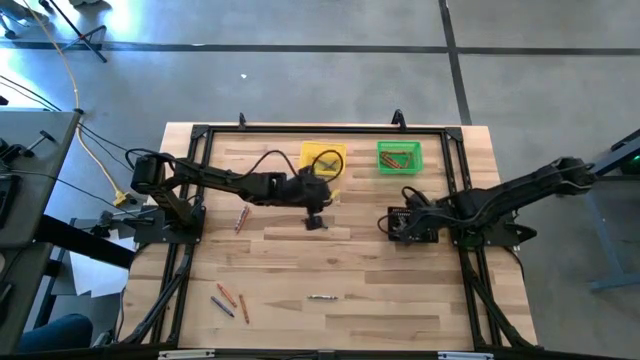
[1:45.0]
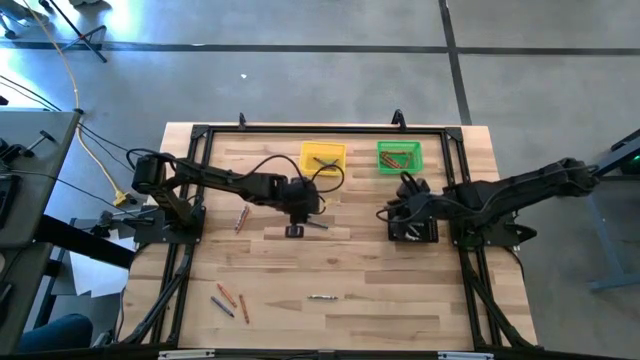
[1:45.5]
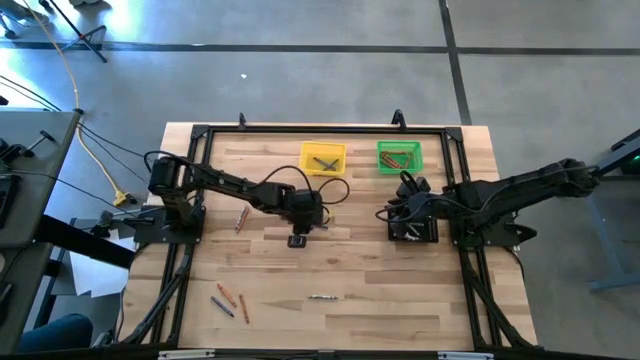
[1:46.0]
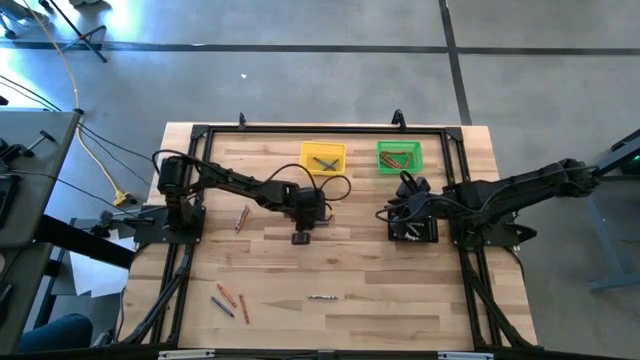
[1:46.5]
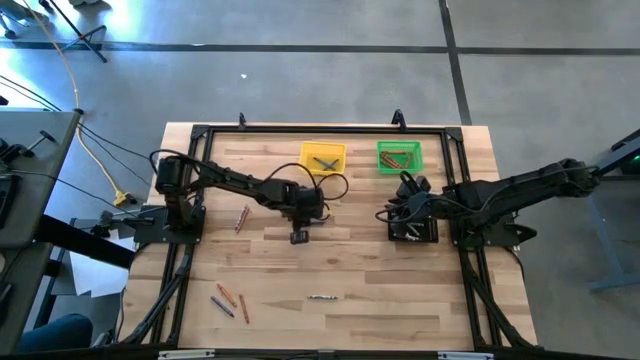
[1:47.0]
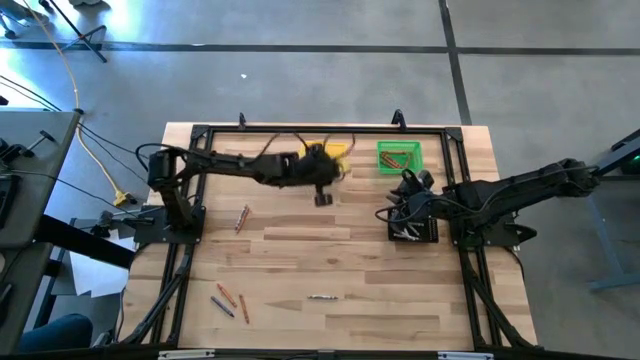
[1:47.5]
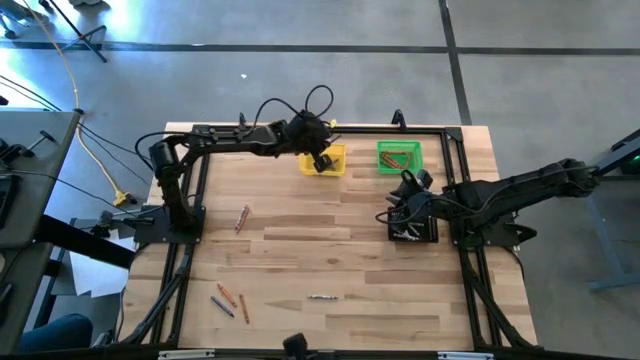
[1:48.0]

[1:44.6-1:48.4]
Task: Sort crayons
Put the blue crayon into the yellow bin

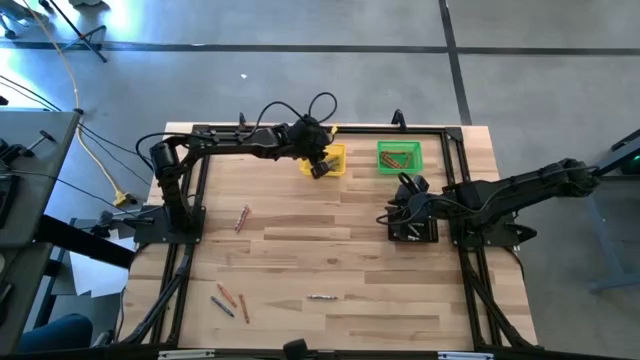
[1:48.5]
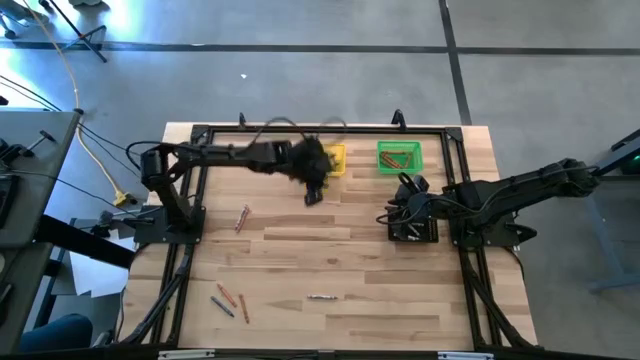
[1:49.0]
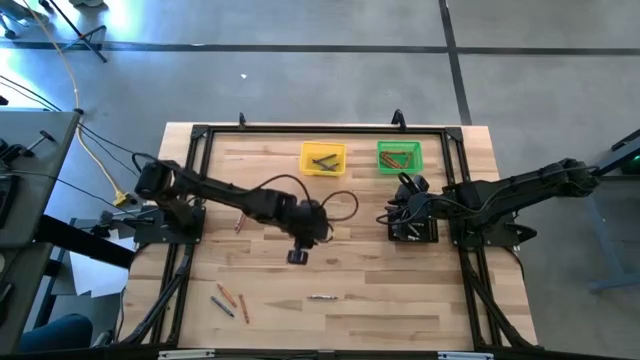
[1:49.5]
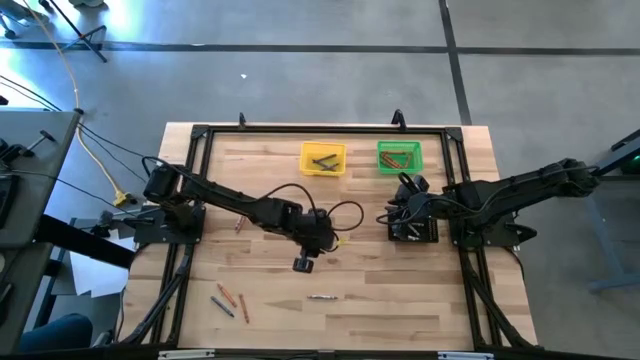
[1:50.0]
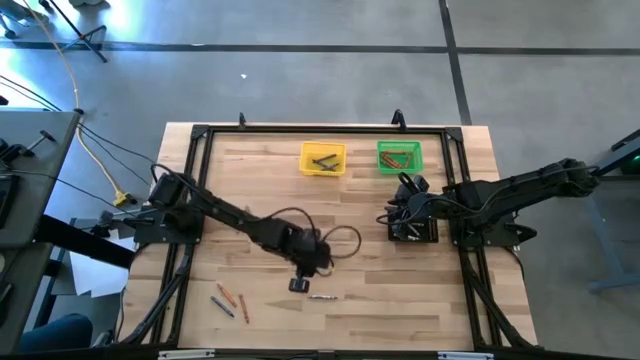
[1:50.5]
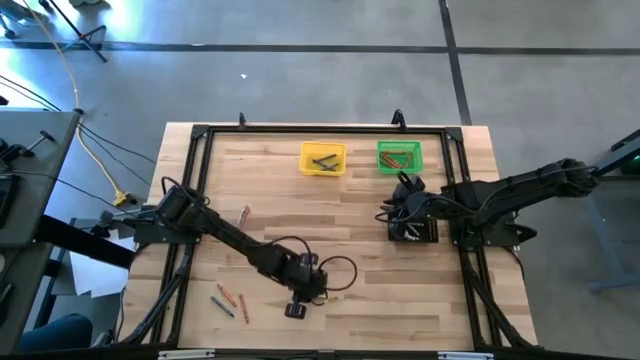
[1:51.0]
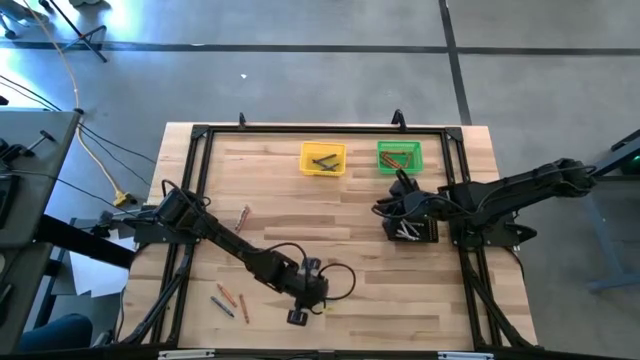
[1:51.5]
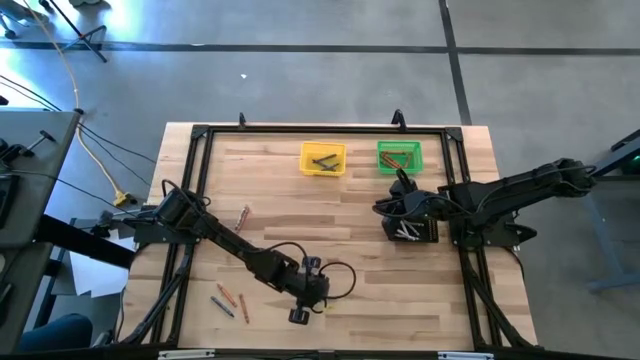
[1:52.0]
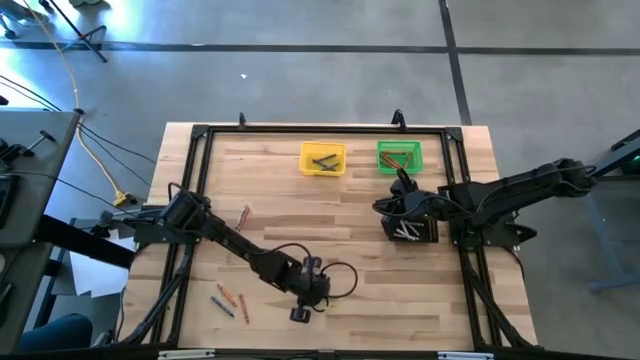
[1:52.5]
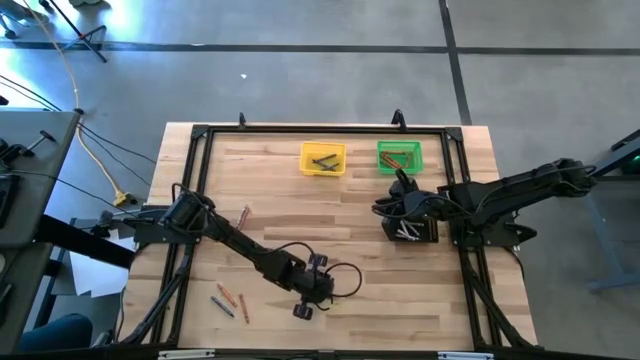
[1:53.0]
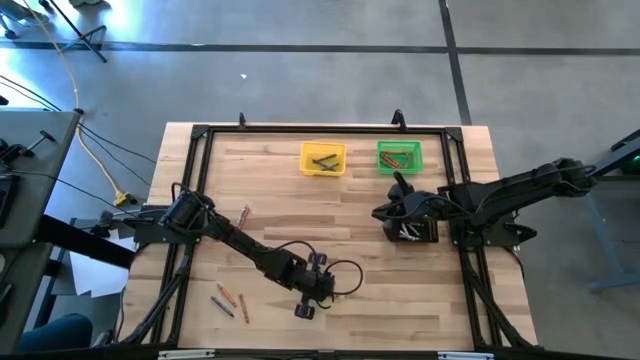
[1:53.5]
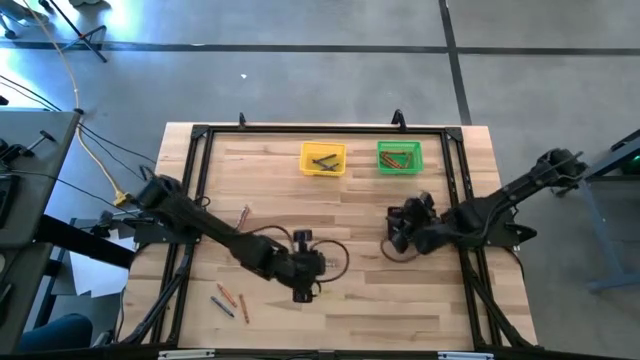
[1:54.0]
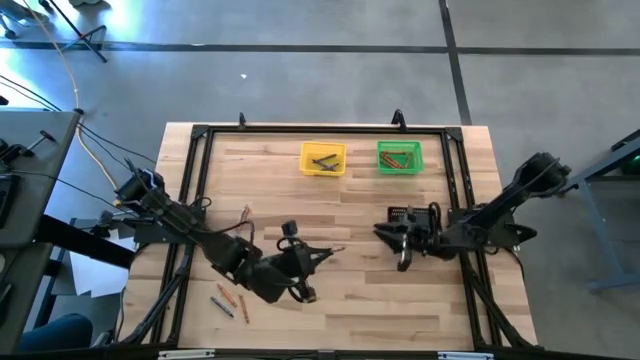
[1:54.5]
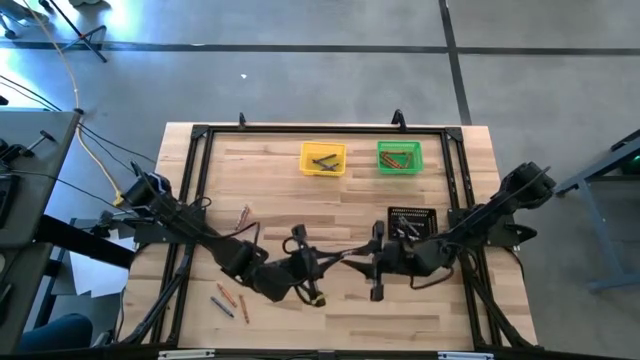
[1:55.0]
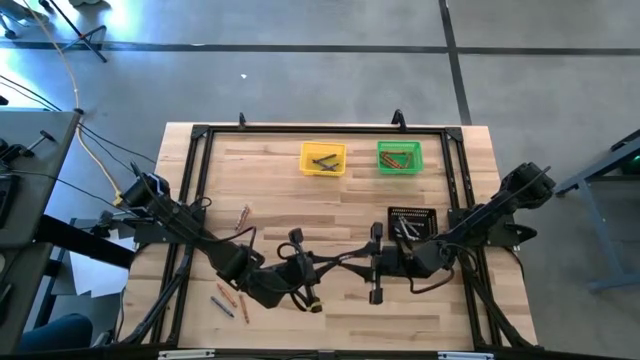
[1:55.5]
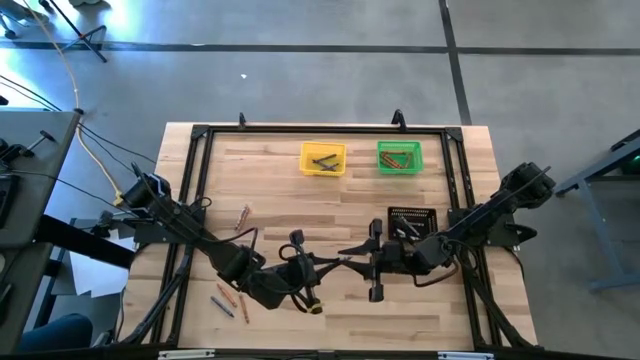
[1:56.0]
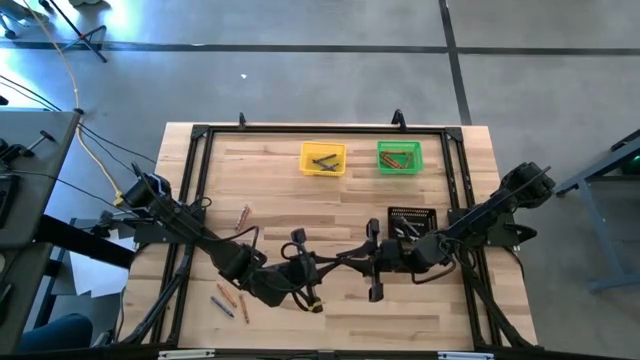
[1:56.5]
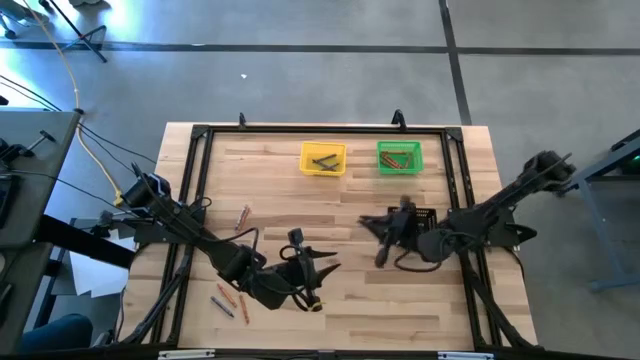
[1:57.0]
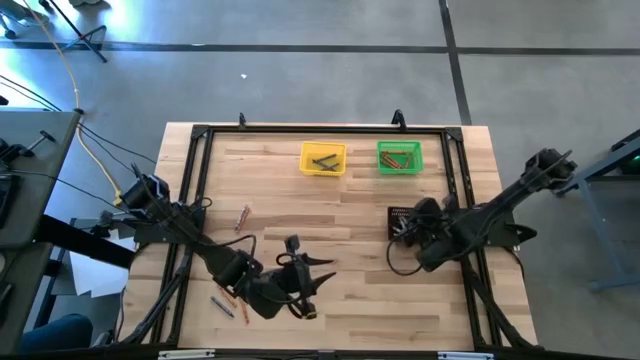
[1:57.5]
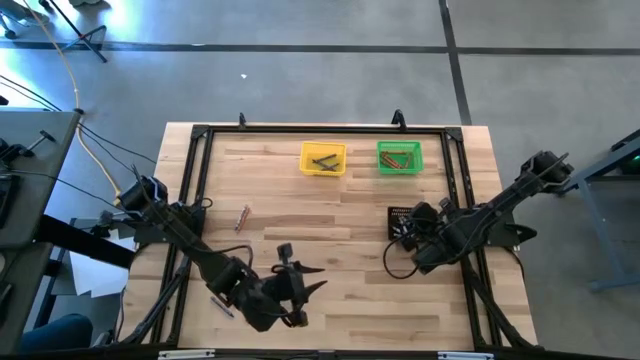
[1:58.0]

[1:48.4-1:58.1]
Put the gray crayon into the black bin

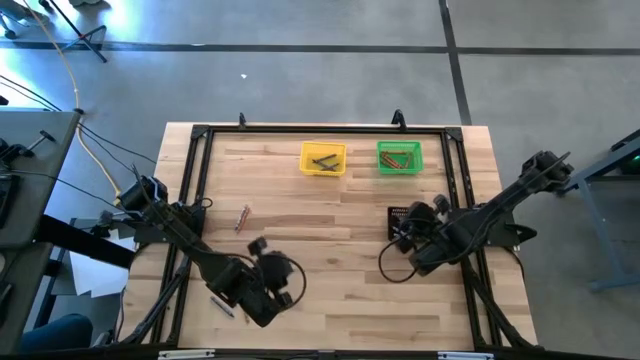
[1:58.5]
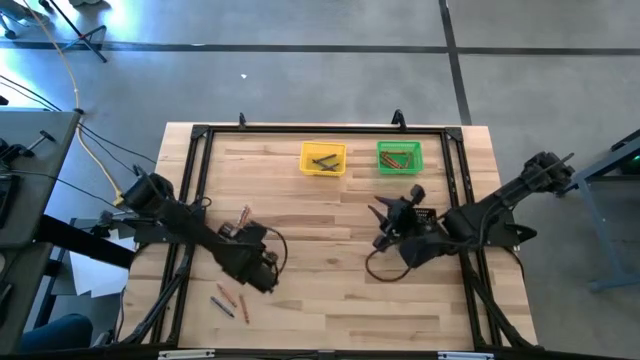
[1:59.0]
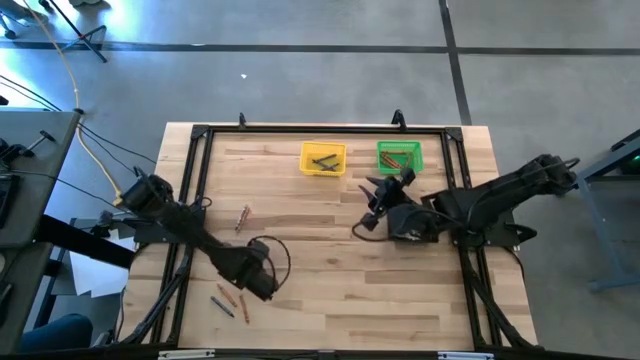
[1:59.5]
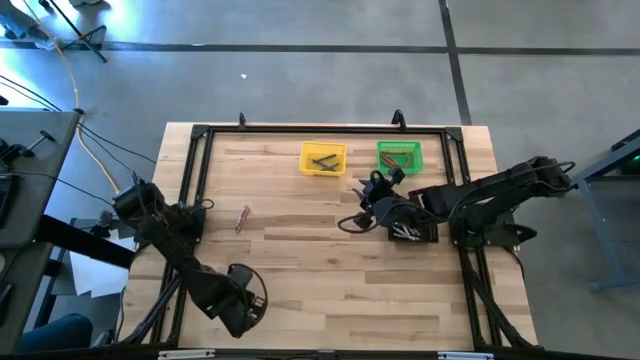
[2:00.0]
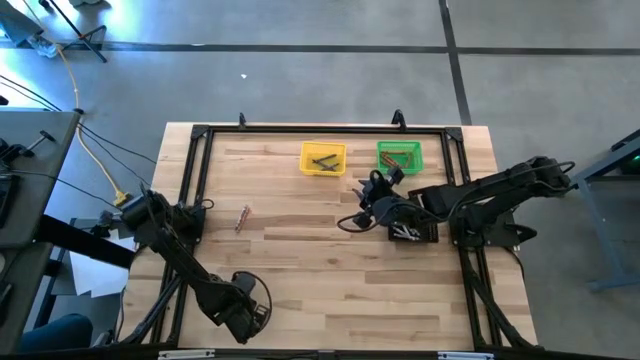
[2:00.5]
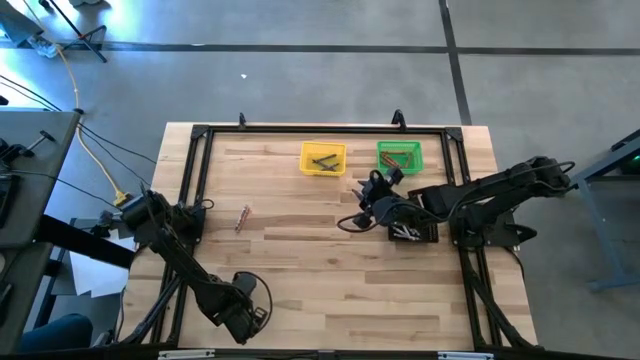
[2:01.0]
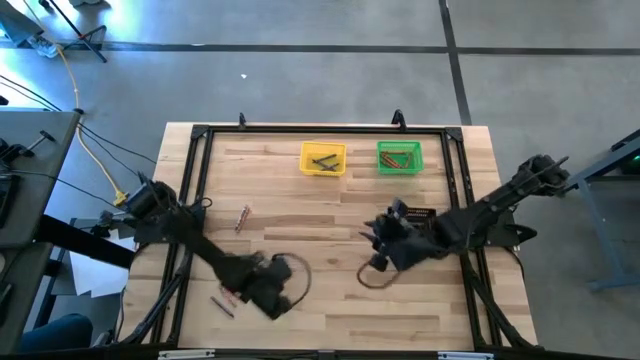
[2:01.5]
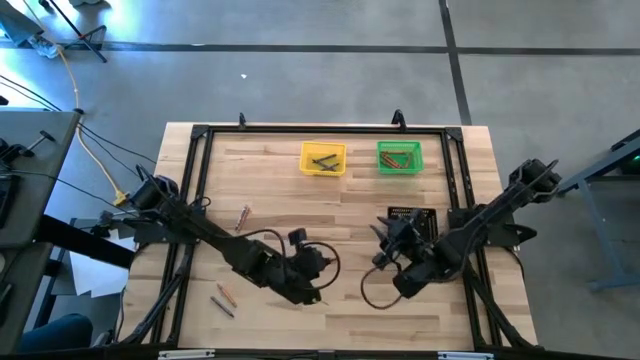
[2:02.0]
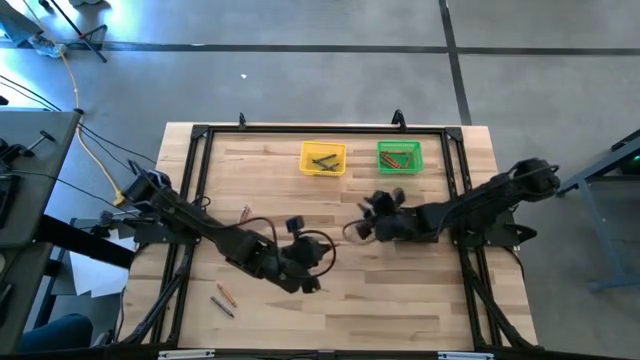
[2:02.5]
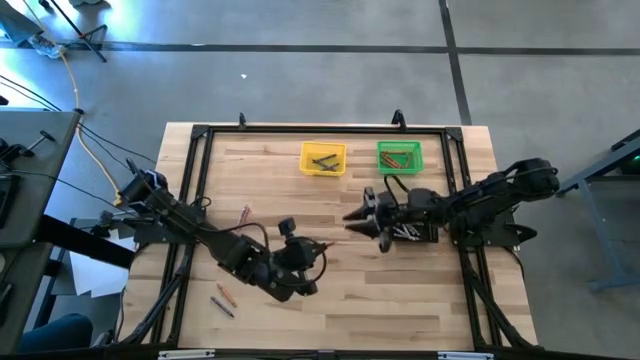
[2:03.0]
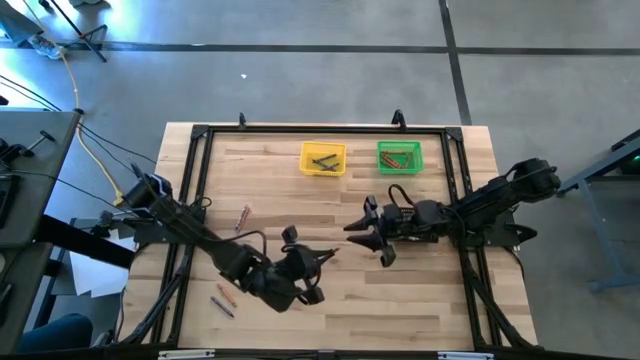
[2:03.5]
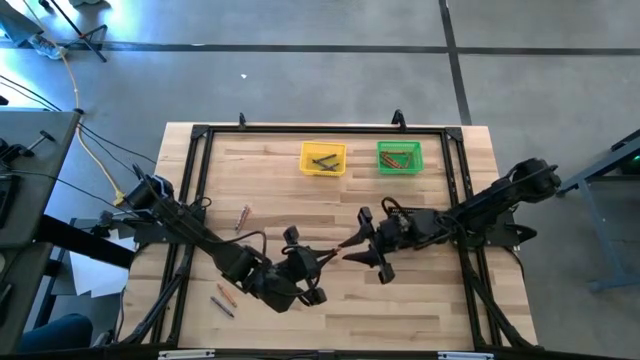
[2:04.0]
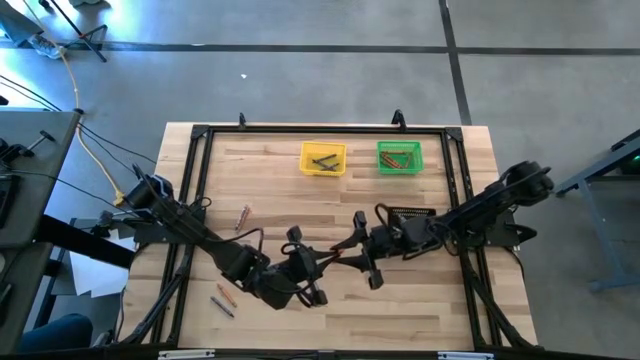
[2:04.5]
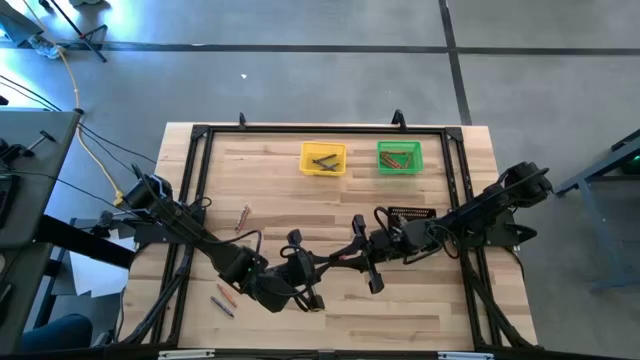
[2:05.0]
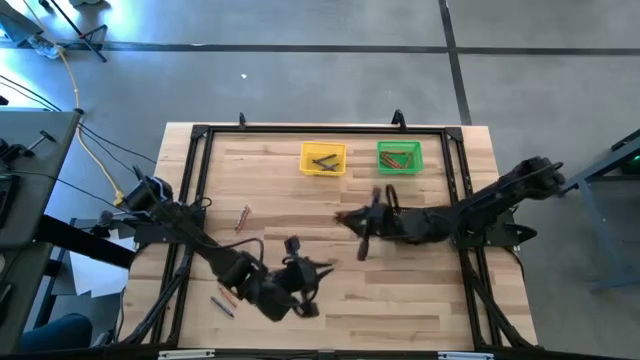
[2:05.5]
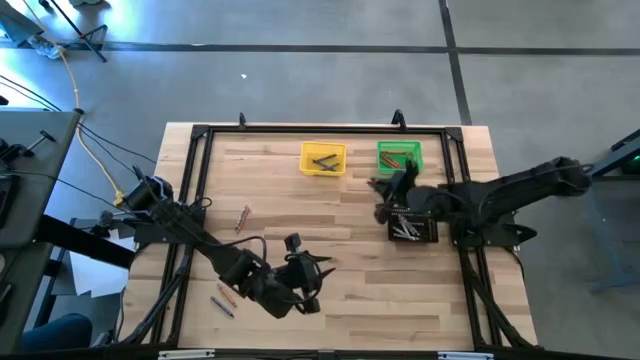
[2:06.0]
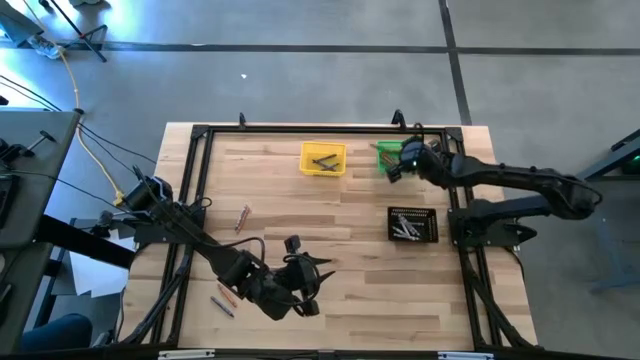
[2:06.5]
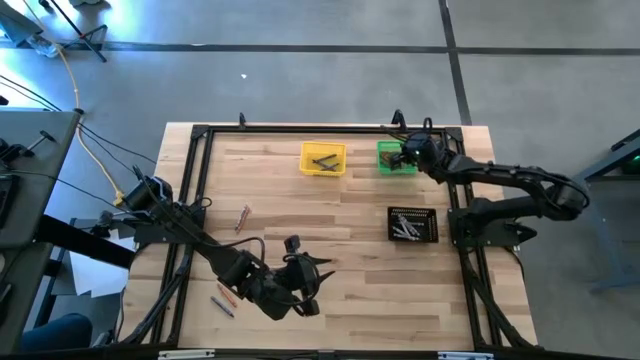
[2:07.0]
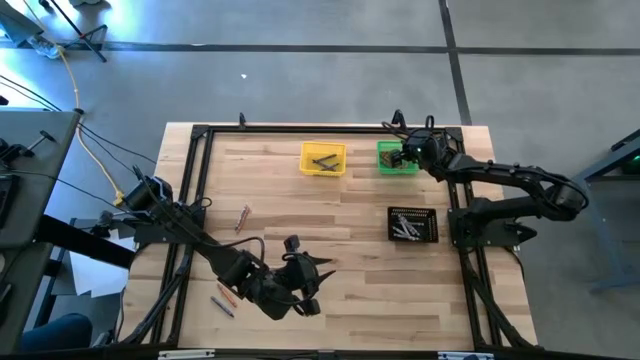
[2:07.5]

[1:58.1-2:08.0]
Put the orange crayon into the green bin
